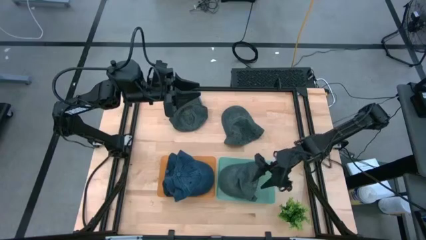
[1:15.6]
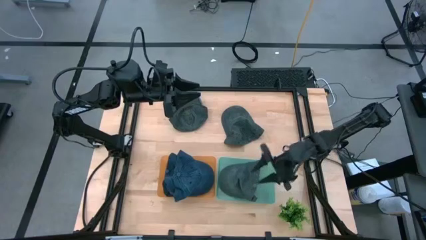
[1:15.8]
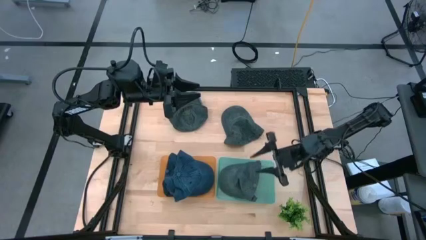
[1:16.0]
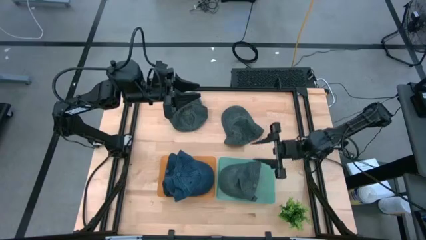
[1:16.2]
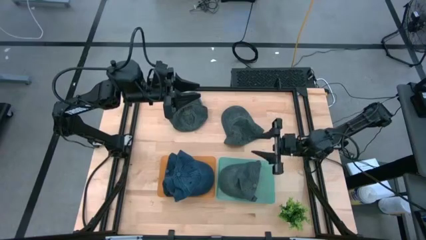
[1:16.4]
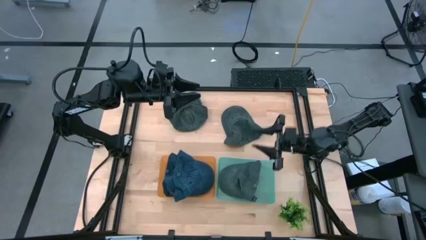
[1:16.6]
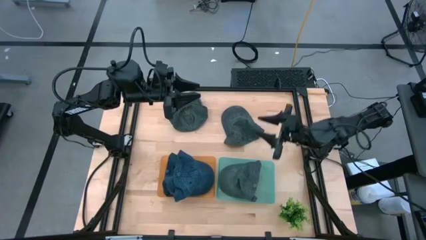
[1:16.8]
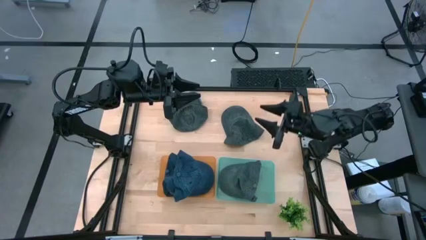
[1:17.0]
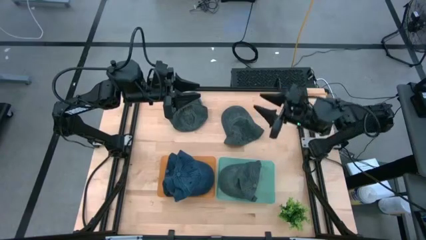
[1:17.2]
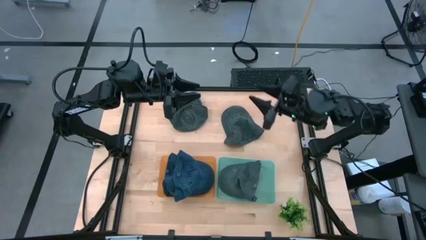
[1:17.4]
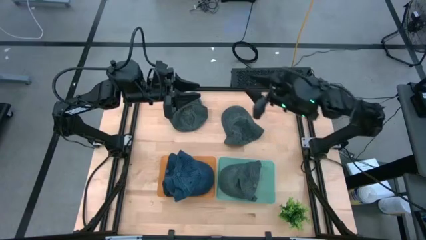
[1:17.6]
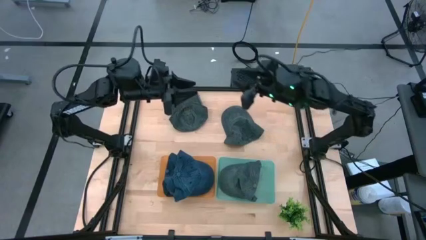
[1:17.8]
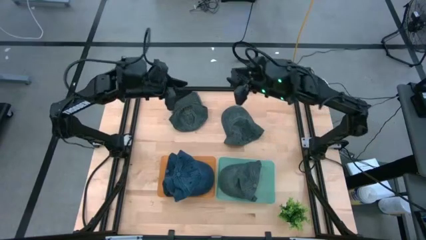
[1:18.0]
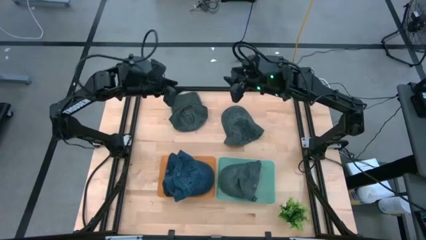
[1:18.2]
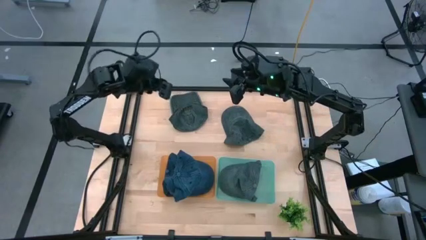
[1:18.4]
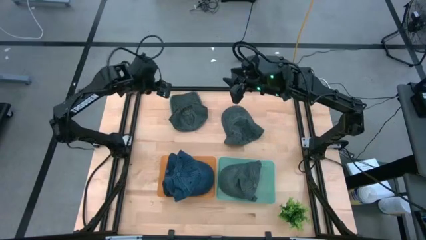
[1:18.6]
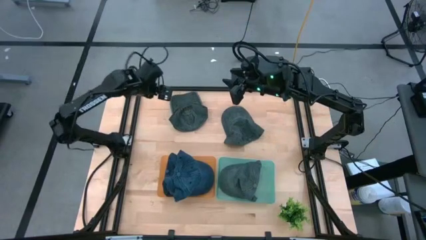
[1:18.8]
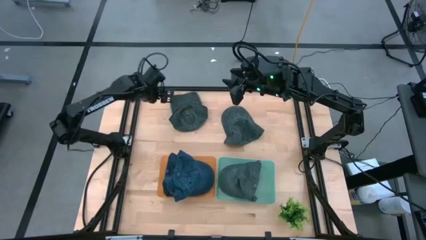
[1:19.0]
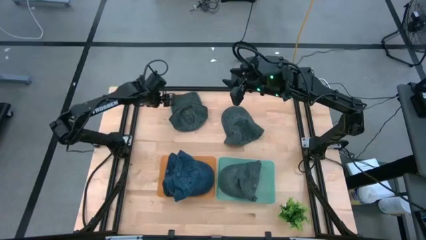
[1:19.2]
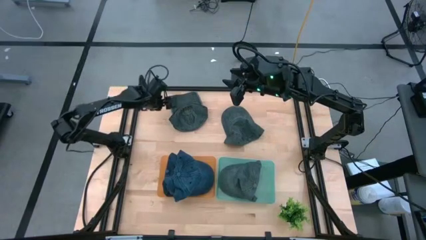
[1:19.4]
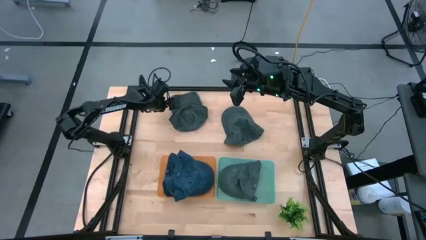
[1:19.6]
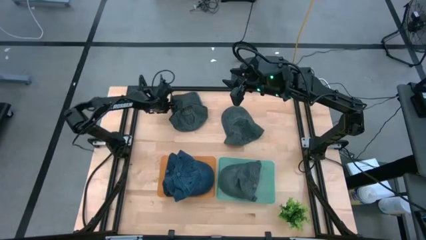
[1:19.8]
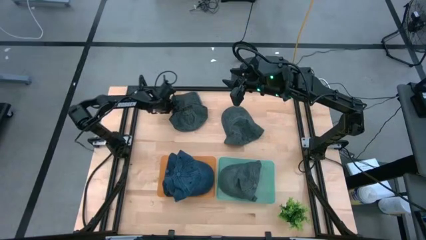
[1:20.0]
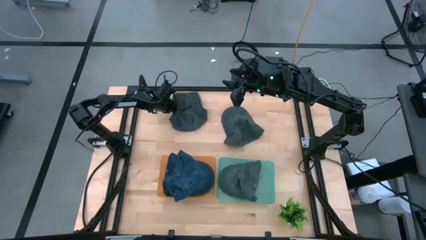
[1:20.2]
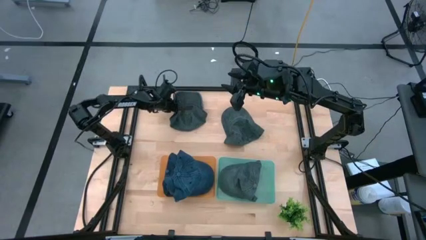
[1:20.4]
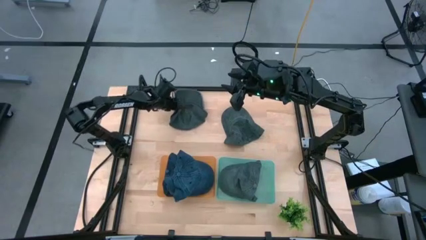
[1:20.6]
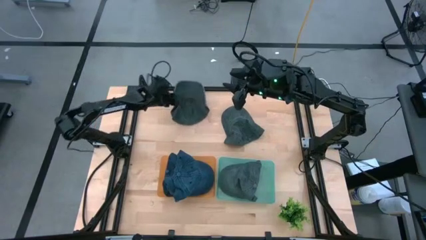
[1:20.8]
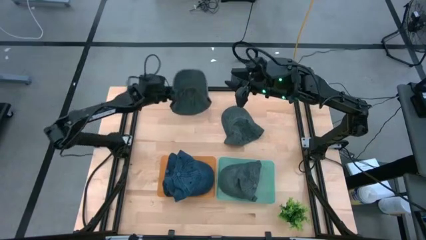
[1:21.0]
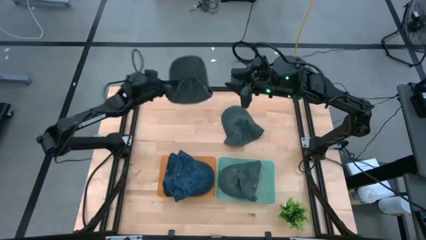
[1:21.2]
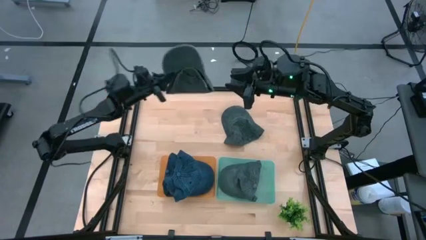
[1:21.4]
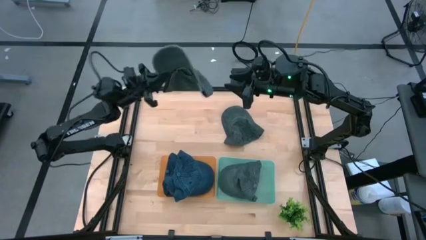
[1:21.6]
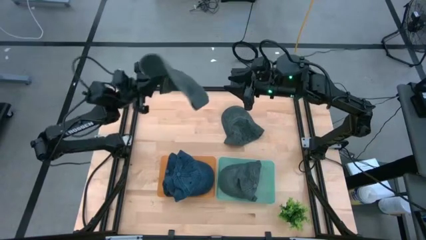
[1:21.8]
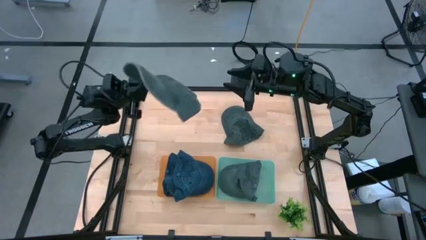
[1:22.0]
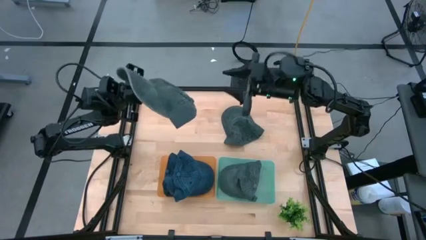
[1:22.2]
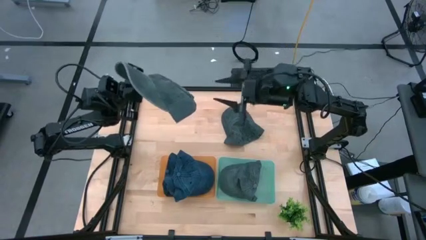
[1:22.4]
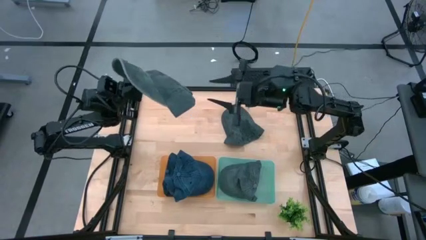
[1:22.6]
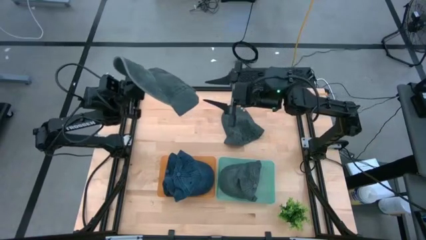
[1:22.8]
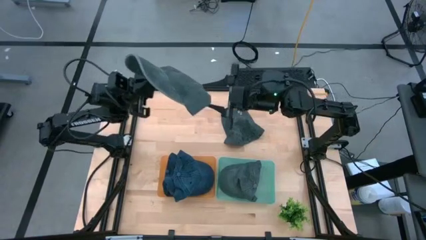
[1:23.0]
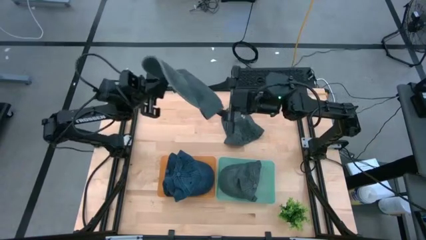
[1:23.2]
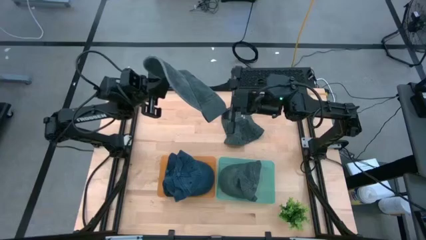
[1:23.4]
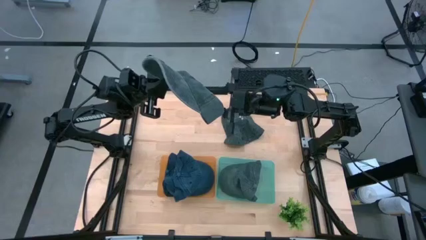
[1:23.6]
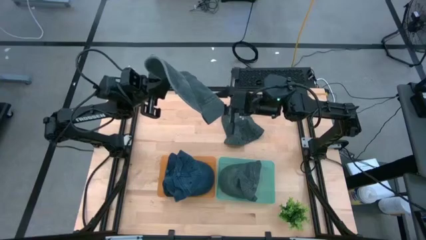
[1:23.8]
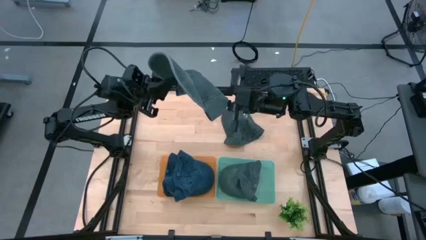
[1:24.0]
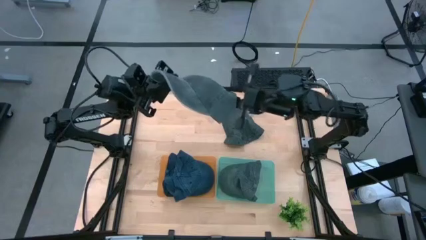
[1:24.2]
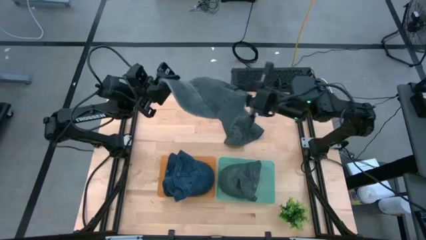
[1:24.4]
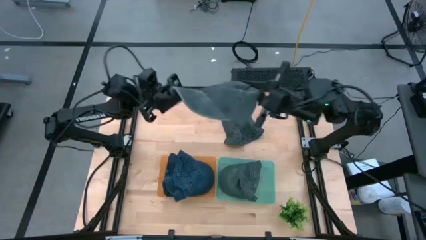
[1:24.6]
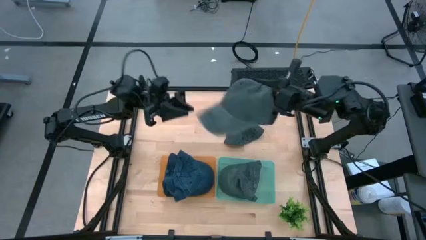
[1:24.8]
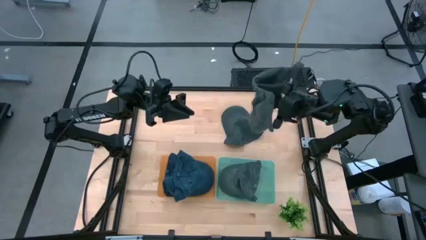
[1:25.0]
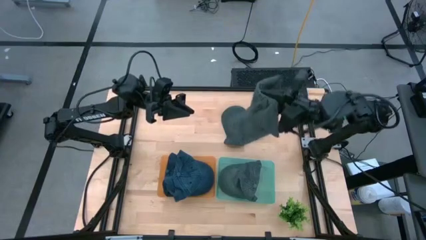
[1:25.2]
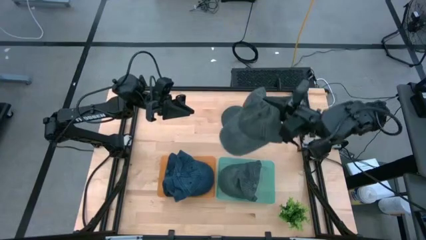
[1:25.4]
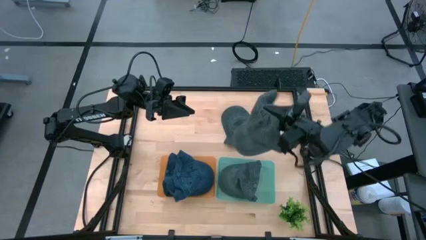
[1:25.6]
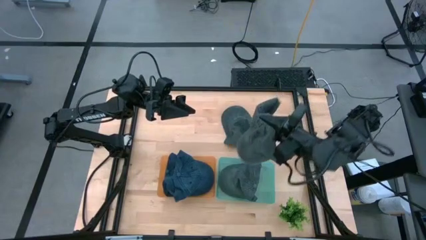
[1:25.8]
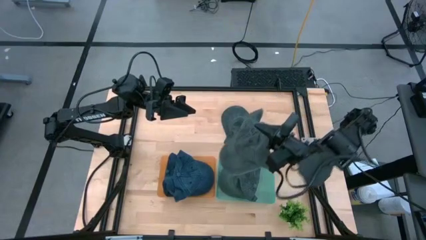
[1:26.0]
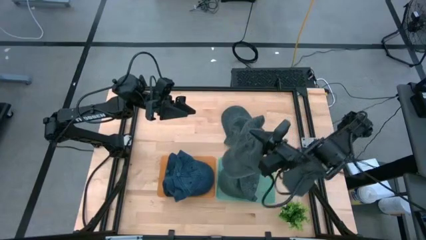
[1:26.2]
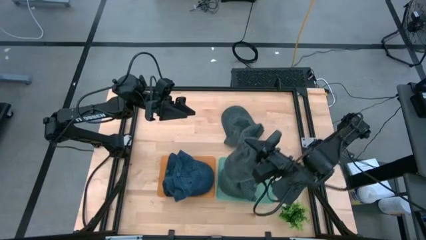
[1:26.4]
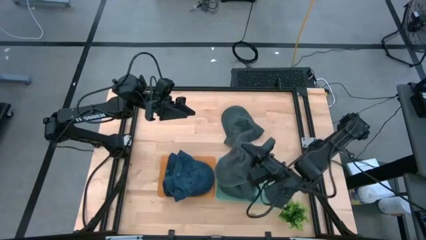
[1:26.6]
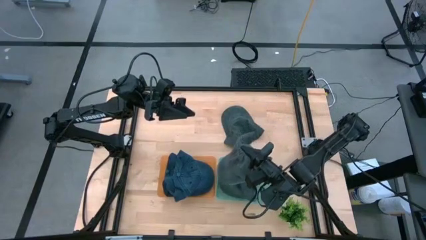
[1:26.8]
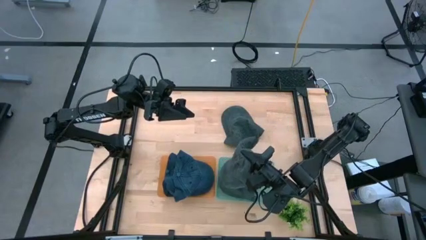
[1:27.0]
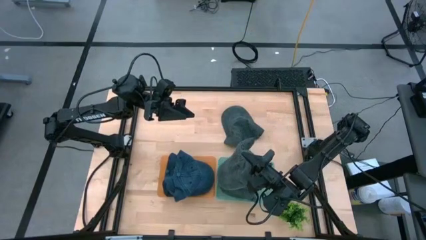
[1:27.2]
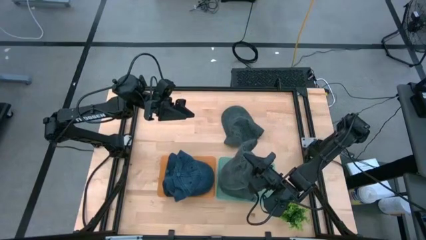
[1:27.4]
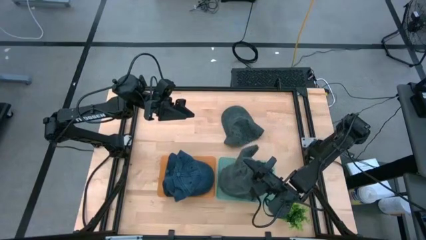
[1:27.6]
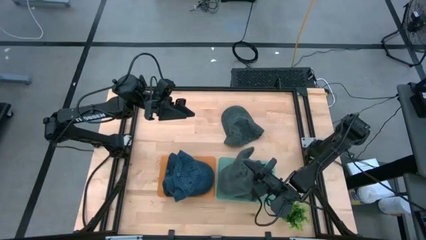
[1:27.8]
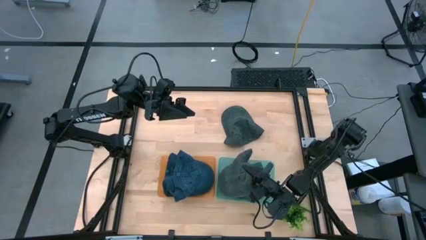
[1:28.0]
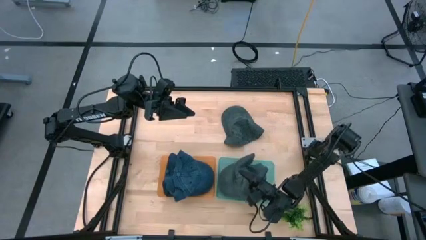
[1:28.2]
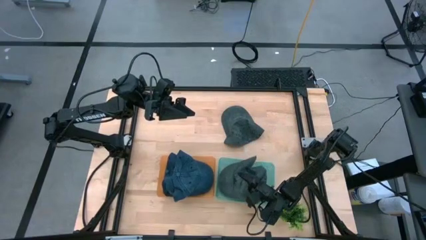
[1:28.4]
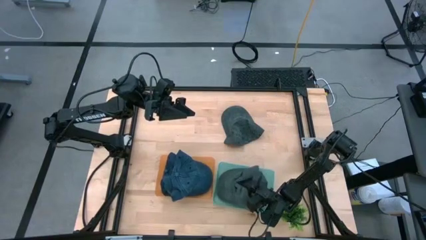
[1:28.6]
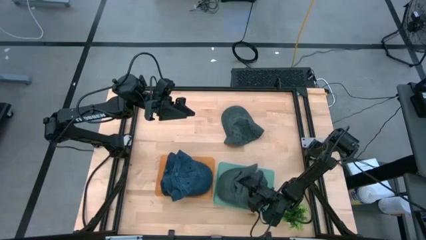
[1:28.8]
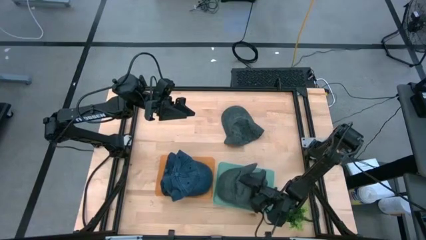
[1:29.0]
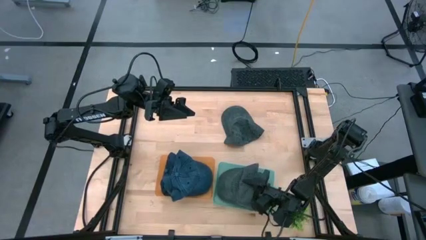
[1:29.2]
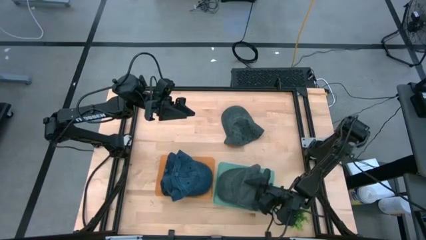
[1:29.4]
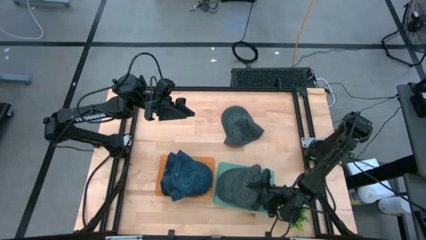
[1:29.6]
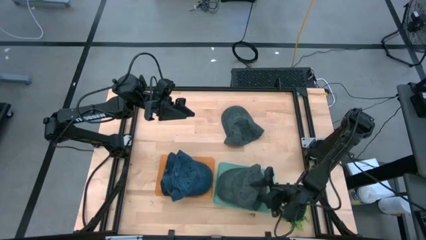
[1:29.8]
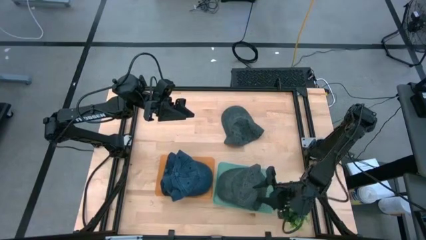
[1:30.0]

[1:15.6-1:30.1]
Task: Pick & Place hat
Put the left gray cap into the blue green bin
